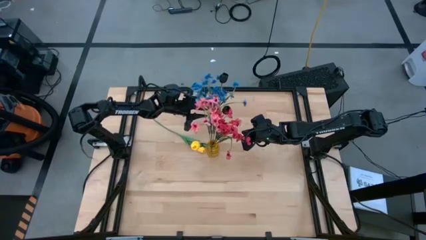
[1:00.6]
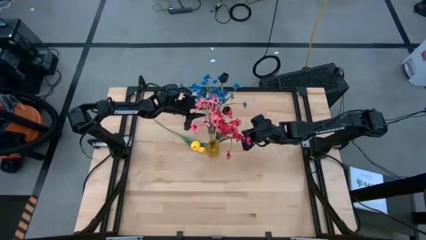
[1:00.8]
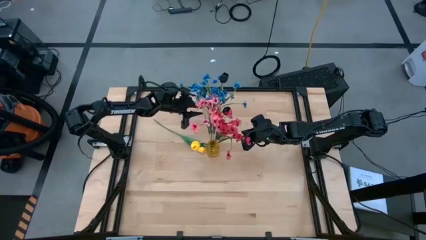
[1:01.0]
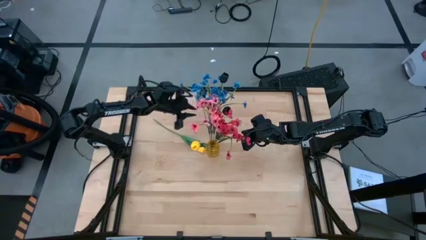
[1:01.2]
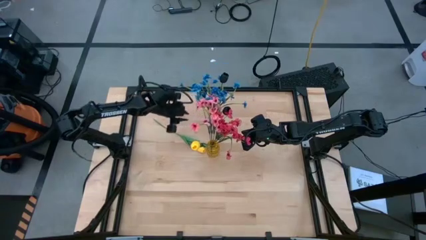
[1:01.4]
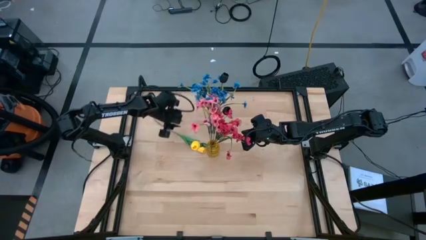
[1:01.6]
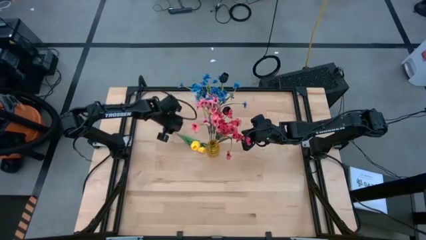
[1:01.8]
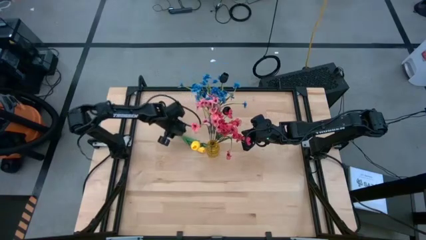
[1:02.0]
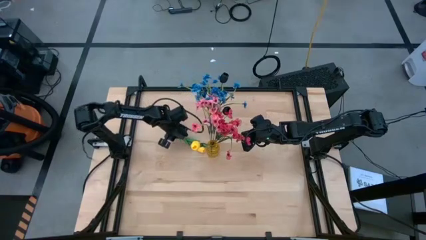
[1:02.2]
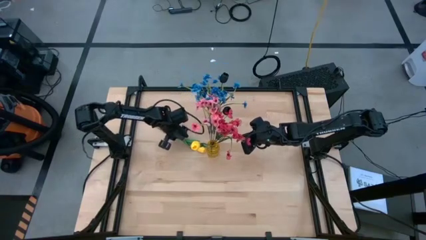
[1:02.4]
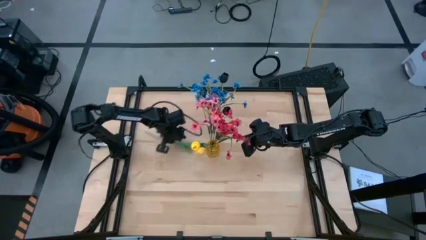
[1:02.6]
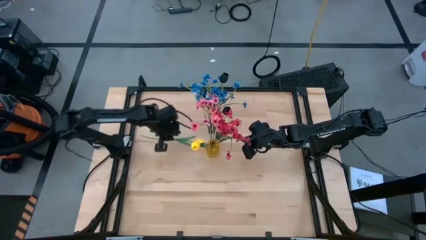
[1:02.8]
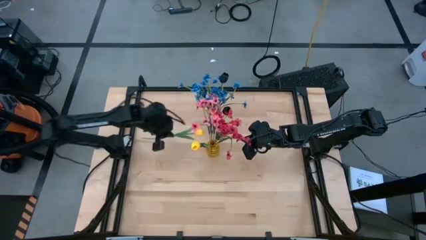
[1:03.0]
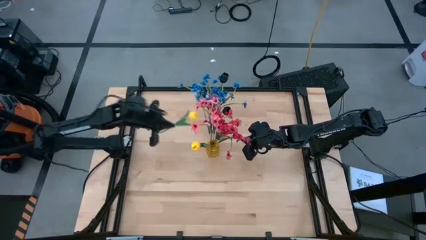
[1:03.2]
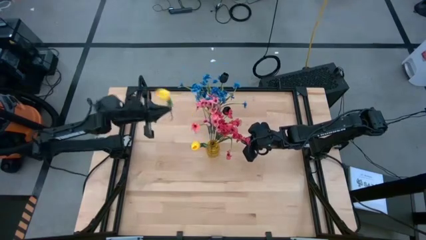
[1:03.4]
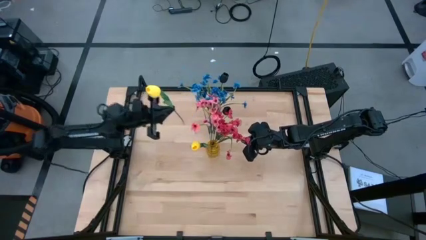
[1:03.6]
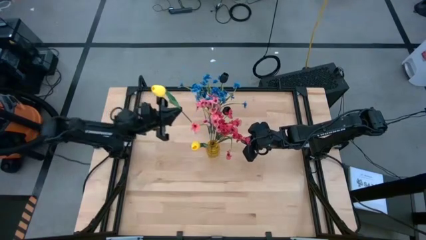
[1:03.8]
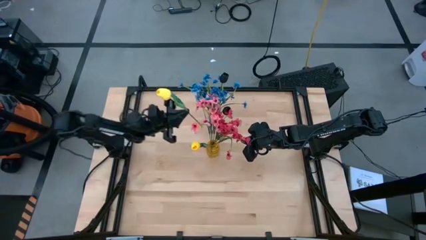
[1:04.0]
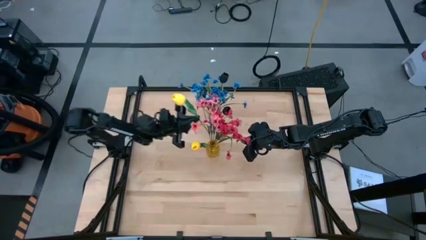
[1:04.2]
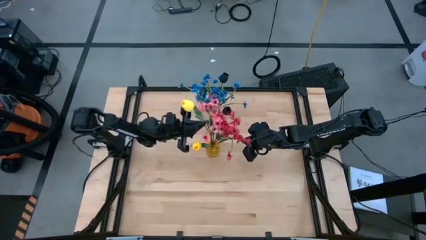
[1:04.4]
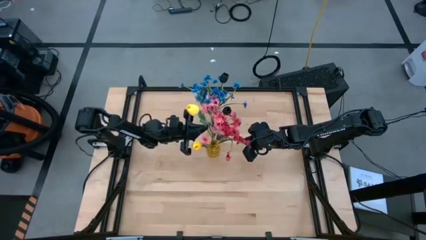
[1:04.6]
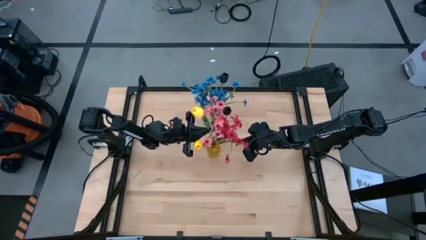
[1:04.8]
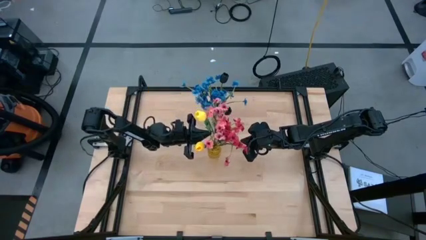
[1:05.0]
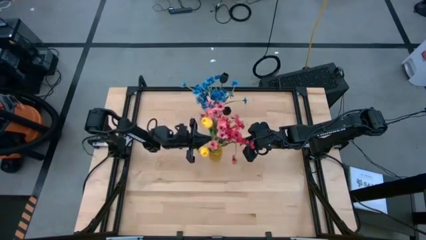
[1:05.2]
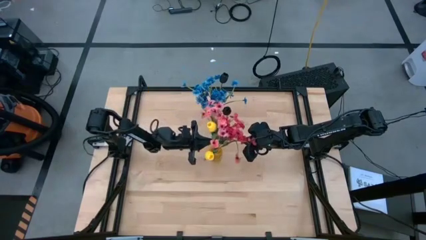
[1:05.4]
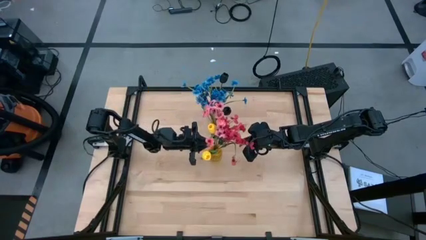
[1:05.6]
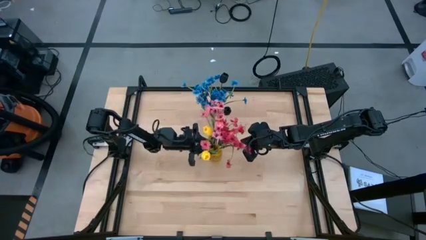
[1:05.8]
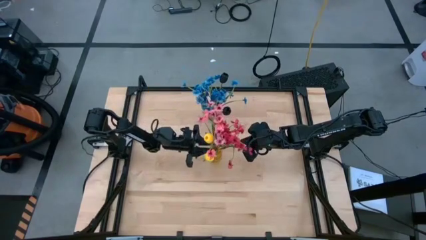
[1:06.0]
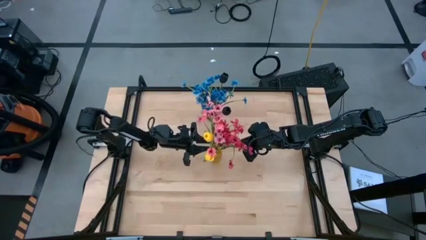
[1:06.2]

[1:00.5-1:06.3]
Task: Sort flowers into vase by color
Put the yellow flower into the yellow flower vase

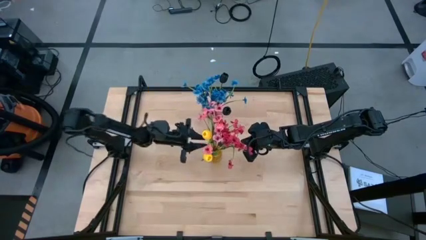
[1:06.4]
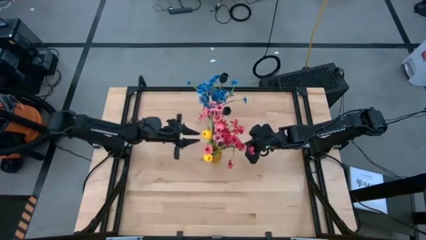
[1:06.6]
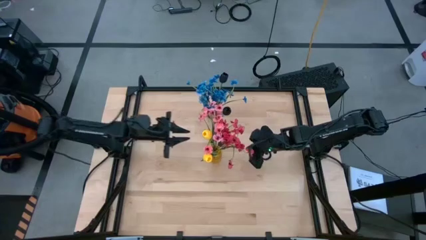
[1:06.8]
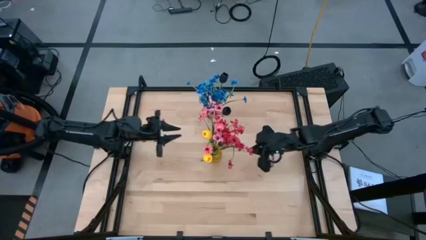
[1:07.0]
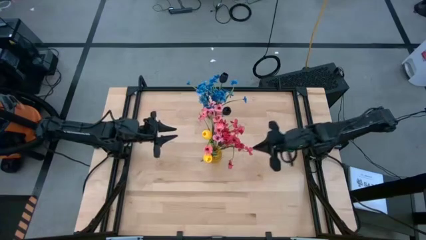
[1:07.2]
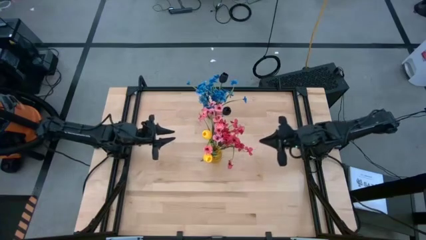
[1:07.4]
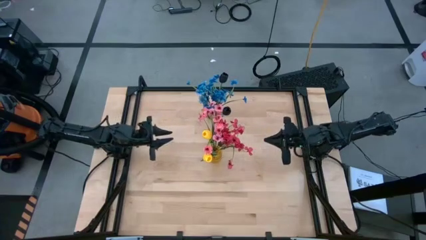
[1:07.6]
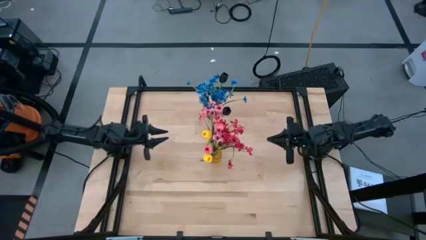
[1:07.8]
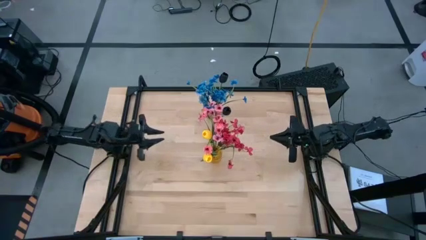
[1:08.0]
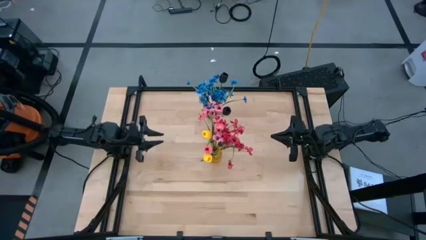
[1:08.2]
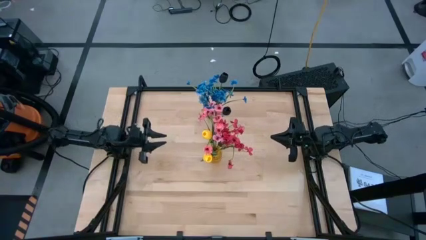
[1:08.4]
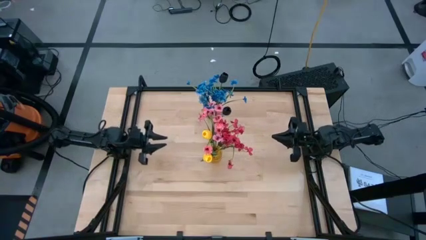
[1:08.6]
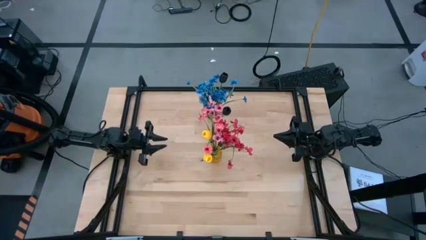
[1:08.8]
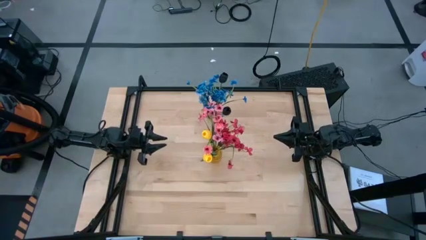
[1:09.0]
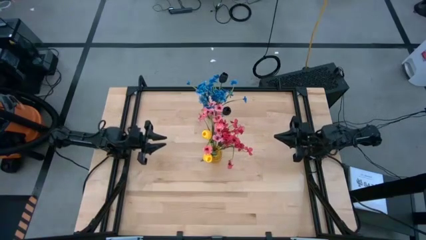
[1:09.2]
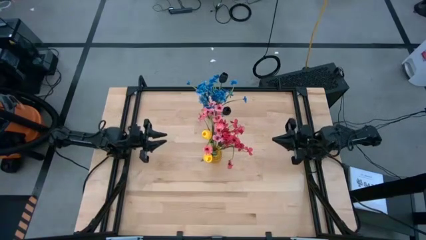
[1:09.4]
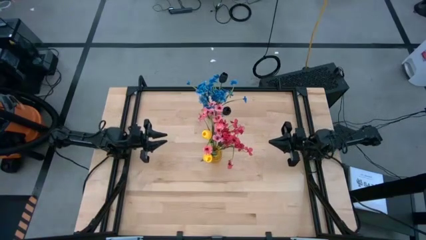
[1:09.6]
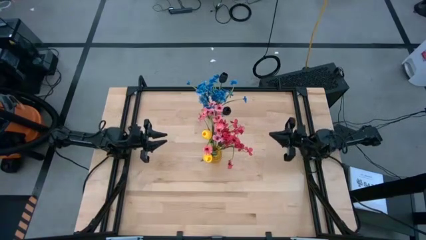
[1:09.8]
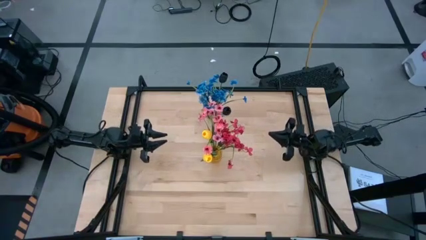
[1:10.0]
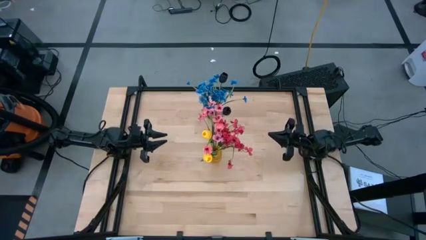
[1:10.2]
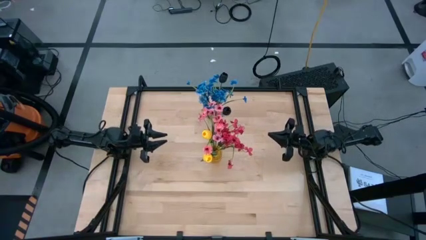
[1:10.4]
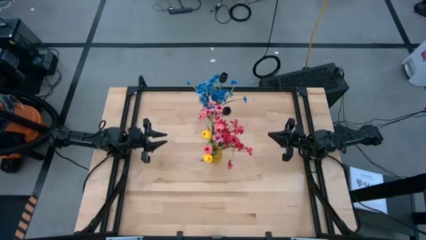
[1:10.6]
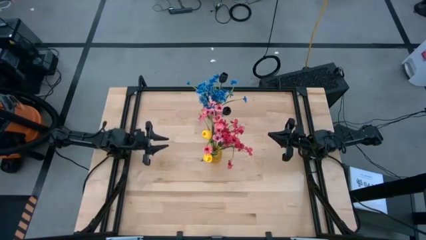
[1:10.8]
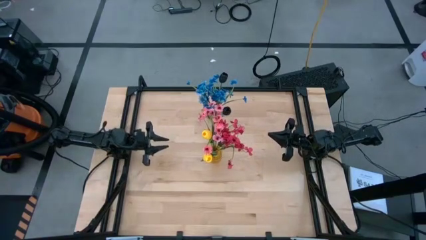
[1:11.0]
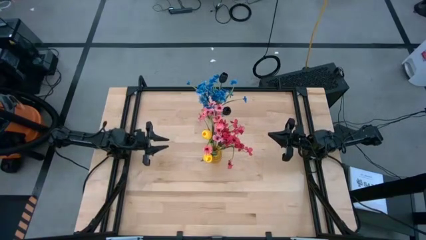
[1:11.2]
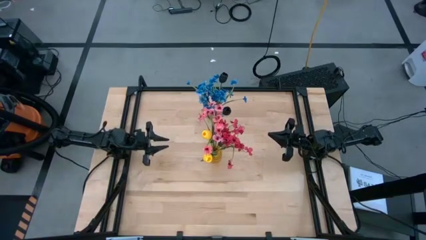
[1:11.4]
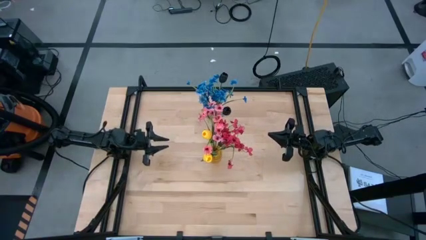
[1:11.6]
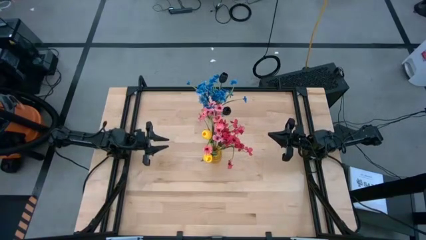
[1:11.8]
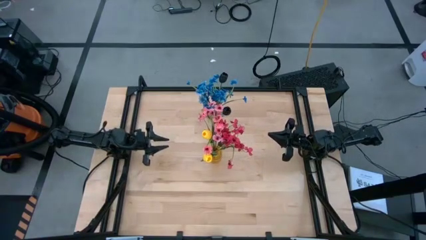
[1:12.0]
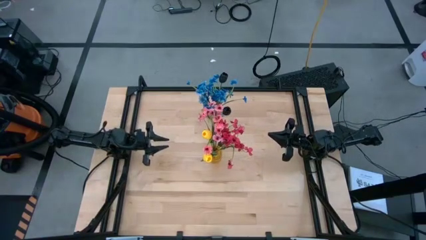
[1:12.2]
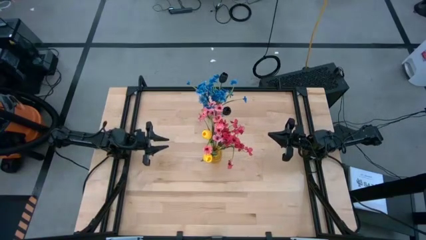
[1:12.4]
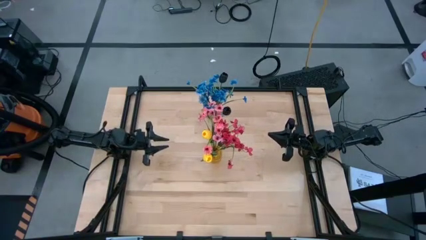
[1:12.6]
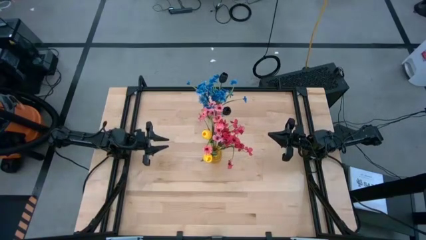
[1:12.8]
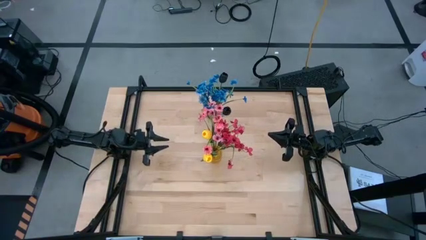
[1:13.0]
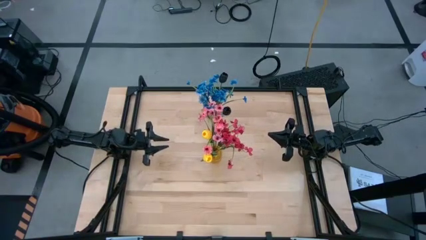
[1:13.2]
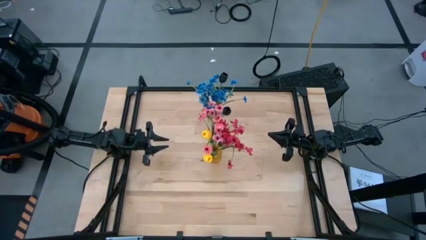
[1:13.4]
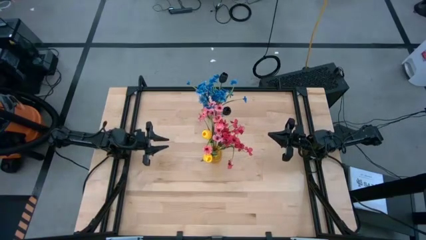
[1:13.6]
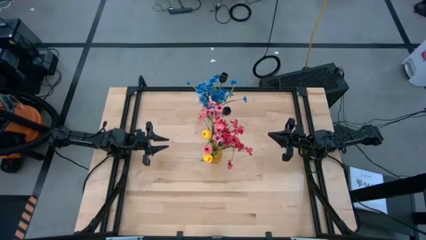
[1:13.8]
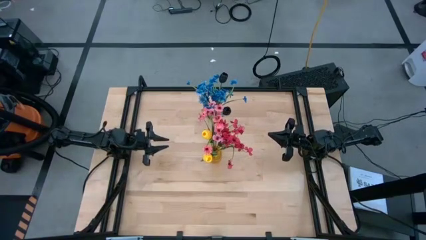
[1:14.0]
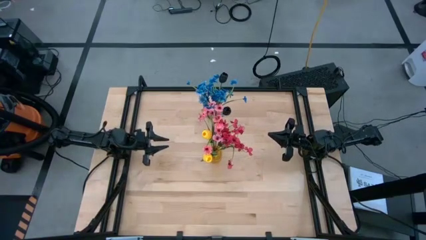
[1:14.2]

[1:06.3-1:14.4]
Return to Home Position

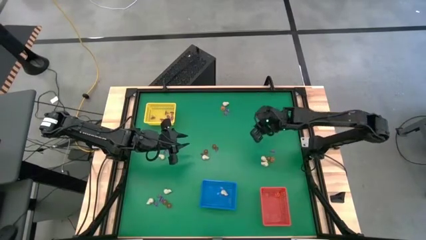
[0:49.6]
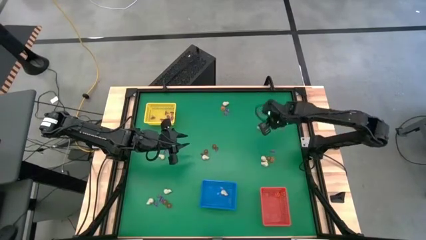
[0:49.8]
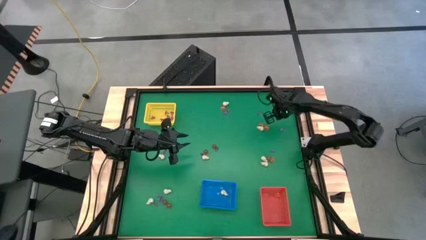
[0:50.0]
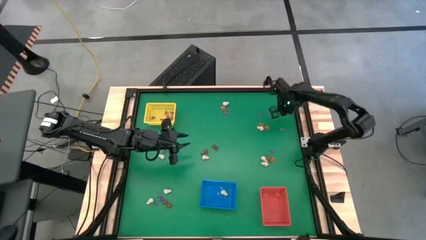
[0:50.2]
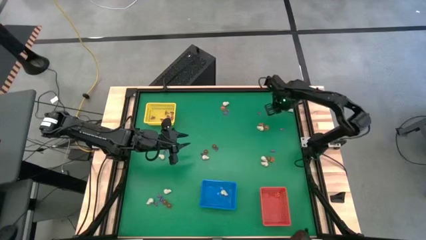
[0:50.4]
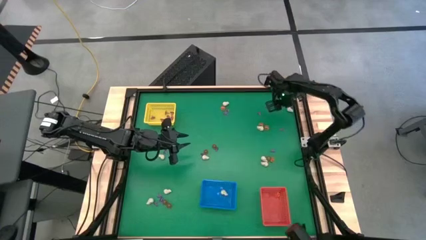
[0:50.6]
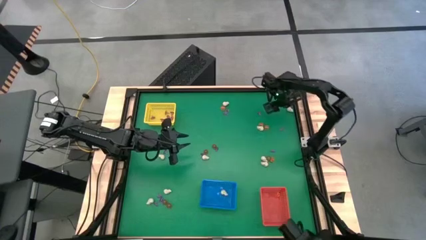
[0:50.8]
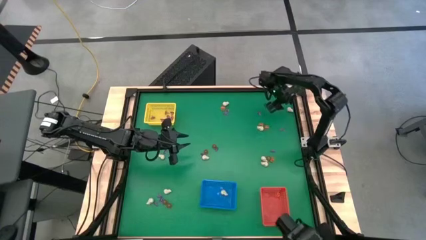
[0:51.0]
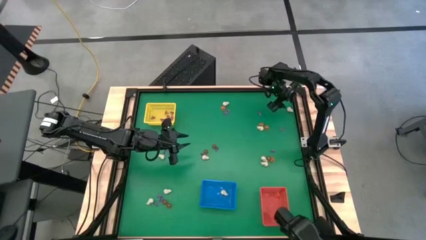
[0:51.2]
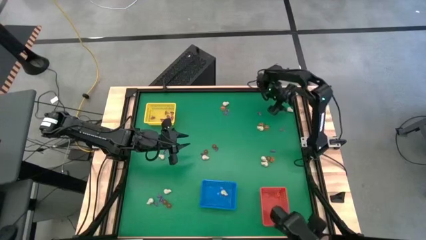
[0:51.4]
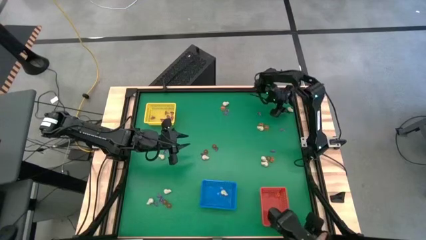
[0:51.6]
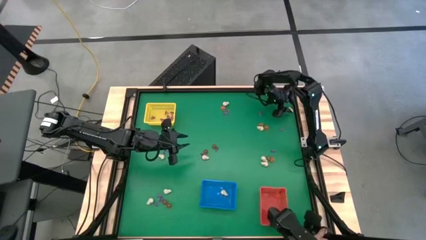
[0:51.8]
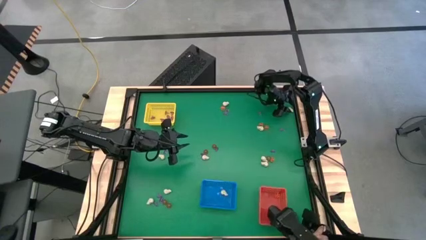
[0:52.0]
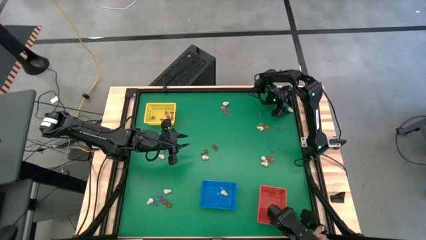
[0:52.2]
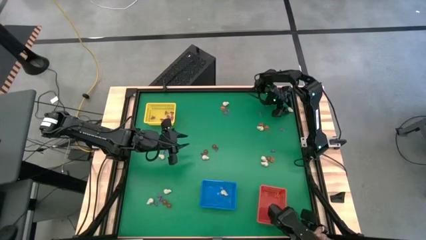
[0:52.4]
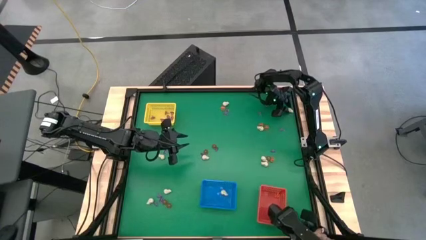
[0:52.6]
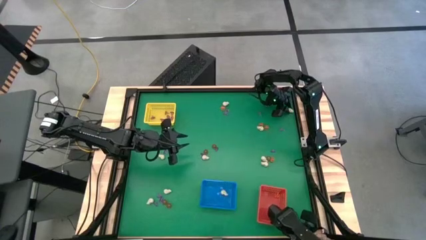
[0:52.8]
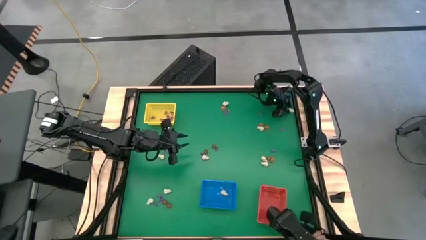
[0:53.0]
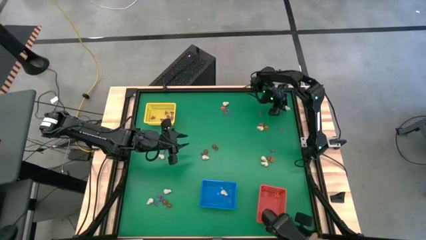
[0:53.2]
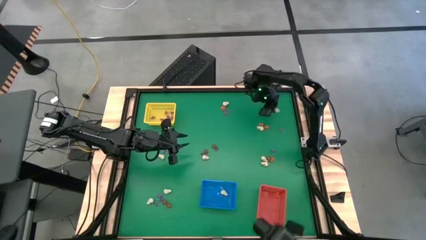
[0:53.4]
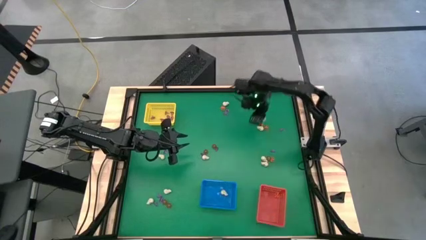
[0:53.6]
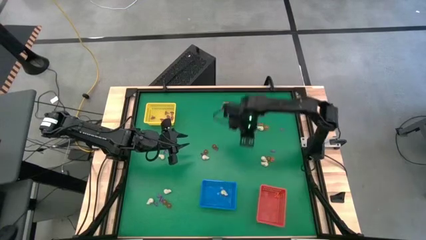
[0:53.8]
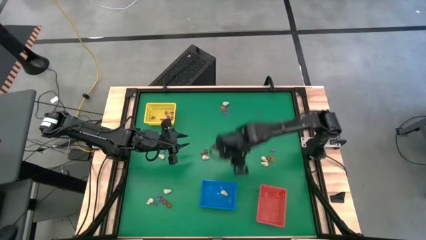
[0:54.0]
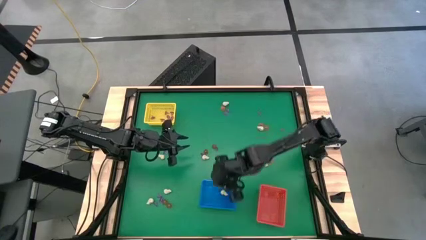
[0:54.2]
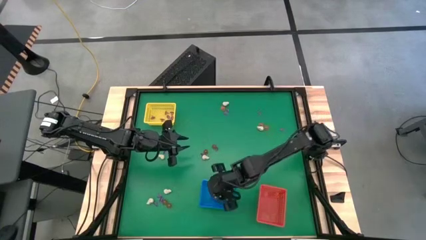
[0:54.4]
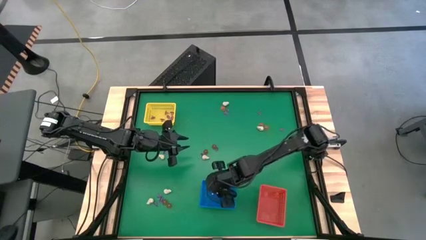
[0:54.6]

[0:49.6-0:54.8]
Task: Sort Halloween decoration
Put the white skull toy into the blue basket
